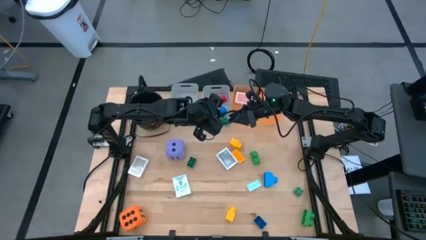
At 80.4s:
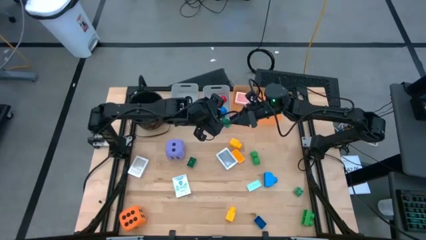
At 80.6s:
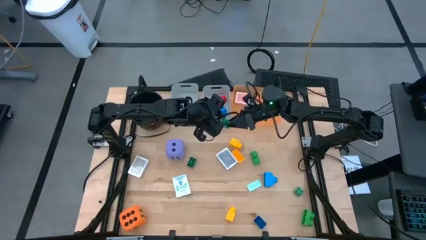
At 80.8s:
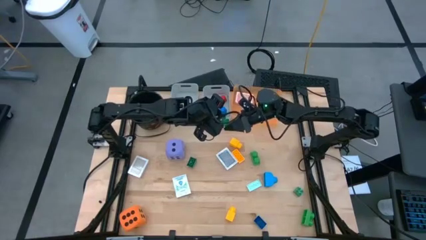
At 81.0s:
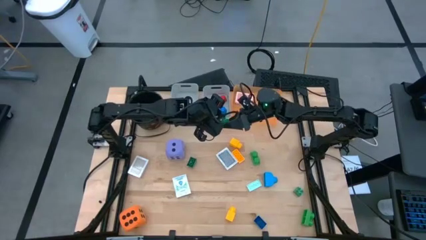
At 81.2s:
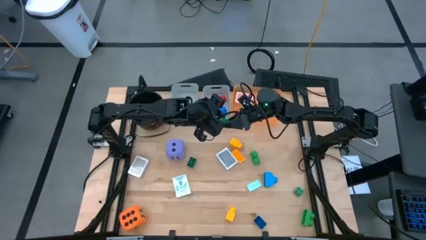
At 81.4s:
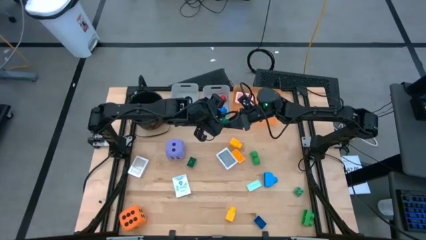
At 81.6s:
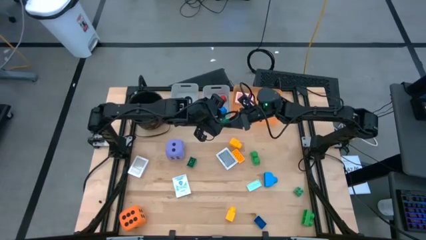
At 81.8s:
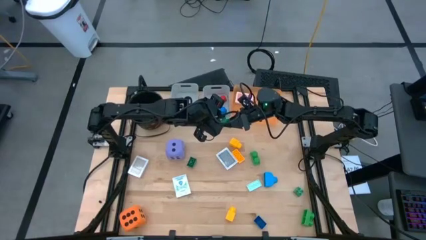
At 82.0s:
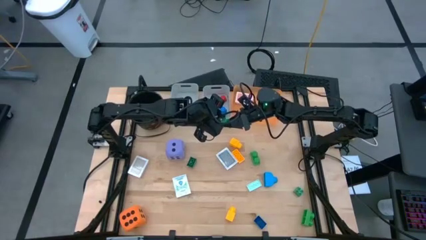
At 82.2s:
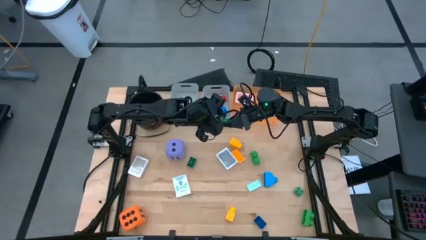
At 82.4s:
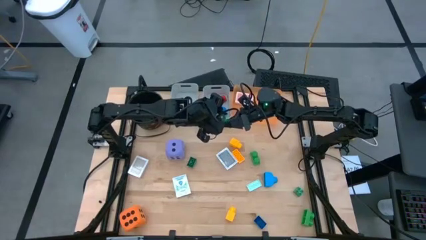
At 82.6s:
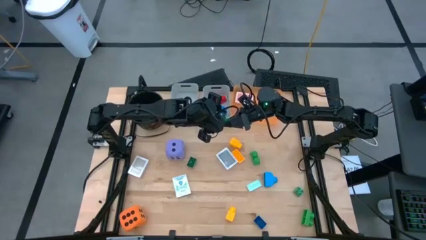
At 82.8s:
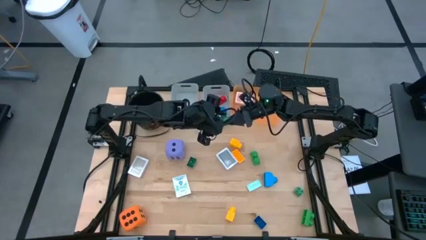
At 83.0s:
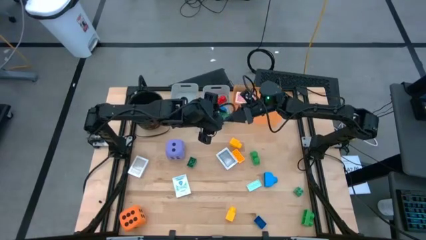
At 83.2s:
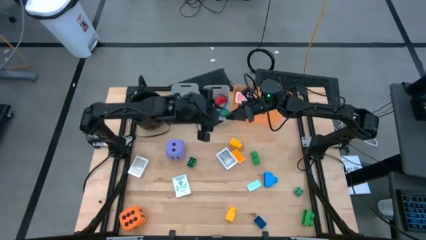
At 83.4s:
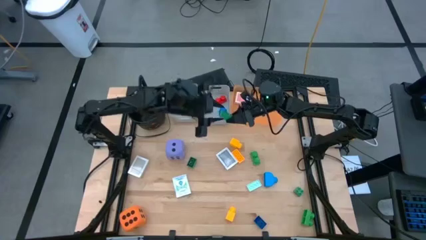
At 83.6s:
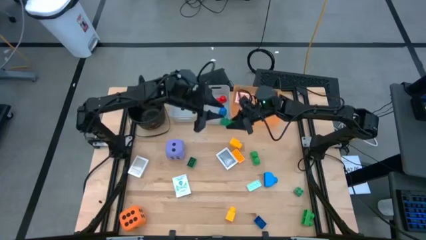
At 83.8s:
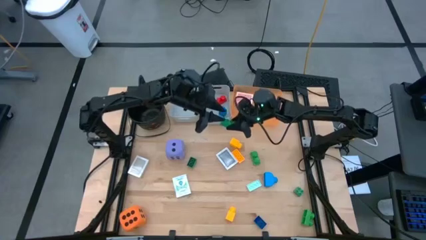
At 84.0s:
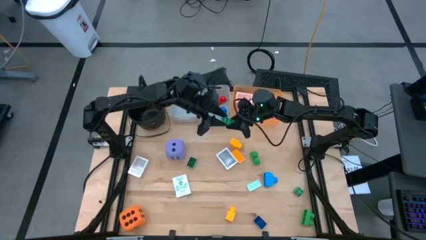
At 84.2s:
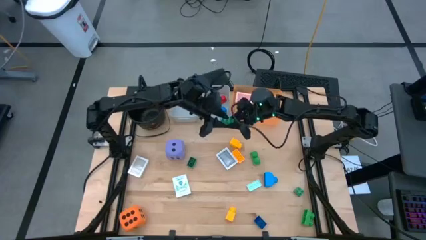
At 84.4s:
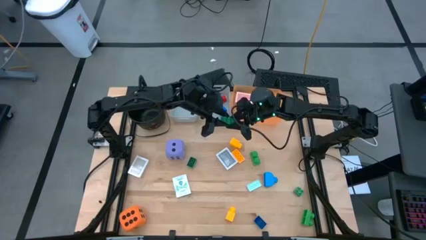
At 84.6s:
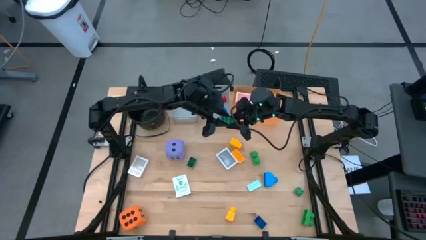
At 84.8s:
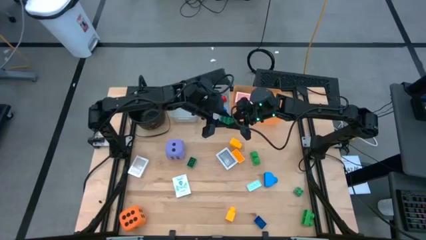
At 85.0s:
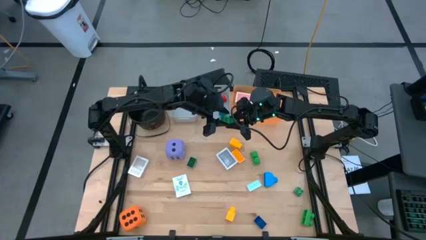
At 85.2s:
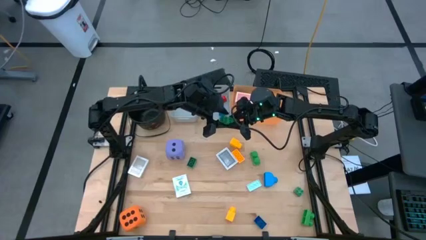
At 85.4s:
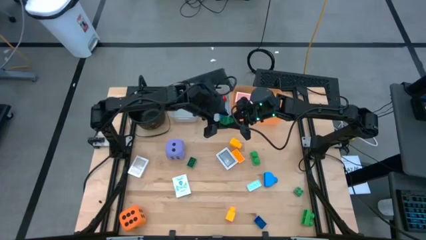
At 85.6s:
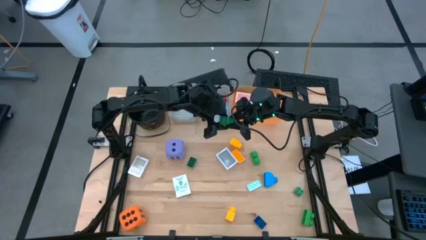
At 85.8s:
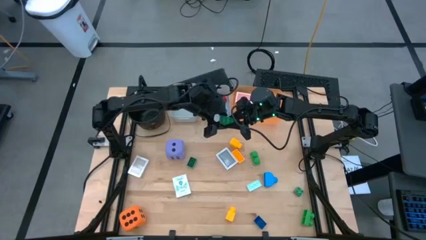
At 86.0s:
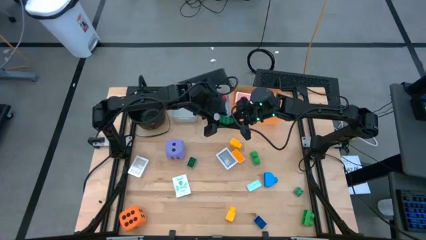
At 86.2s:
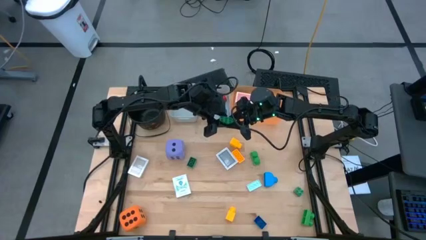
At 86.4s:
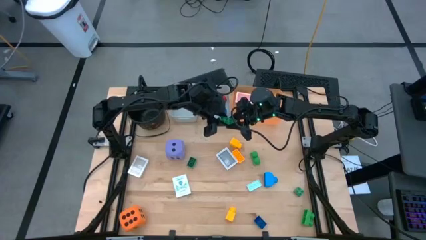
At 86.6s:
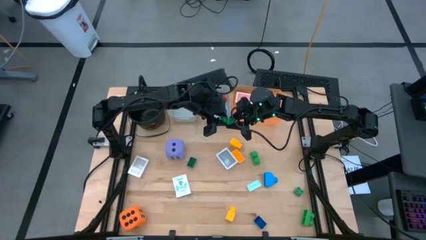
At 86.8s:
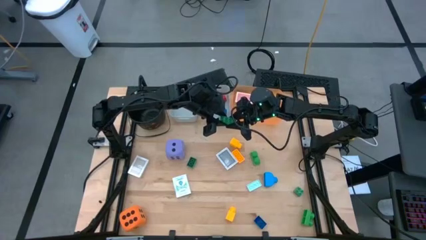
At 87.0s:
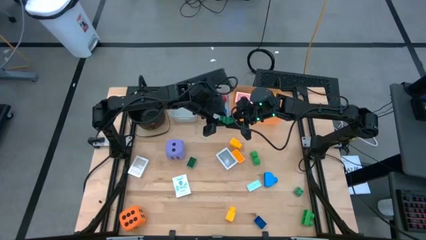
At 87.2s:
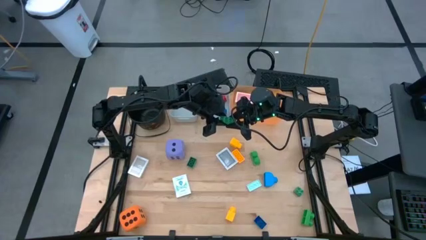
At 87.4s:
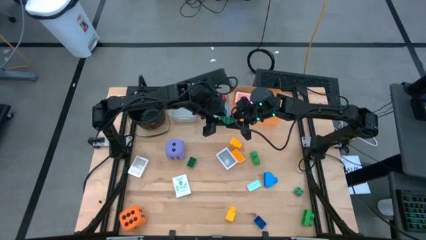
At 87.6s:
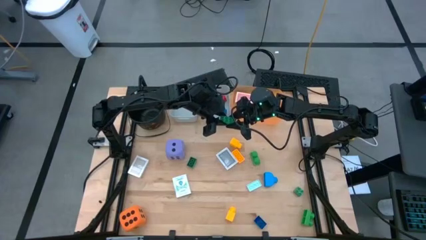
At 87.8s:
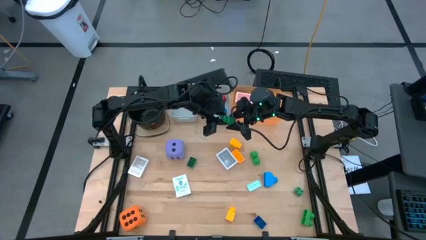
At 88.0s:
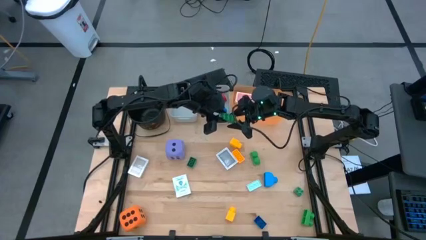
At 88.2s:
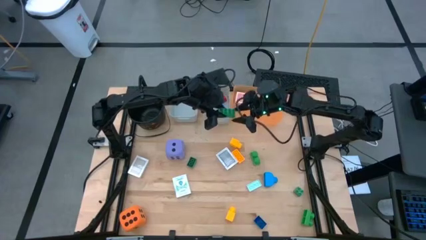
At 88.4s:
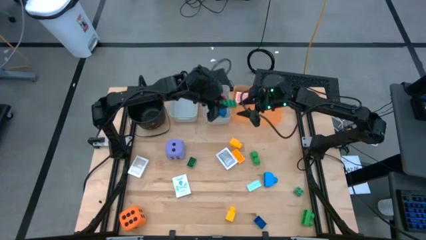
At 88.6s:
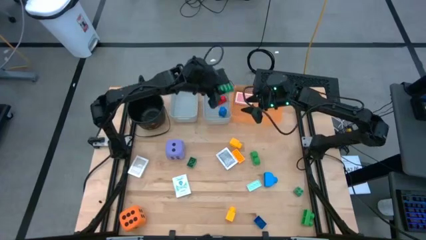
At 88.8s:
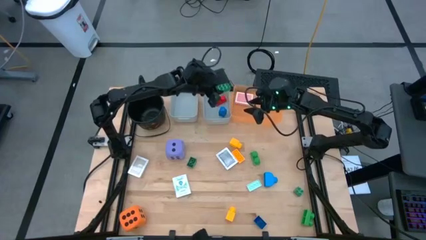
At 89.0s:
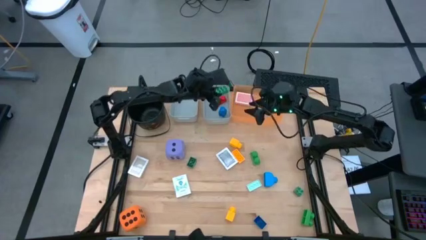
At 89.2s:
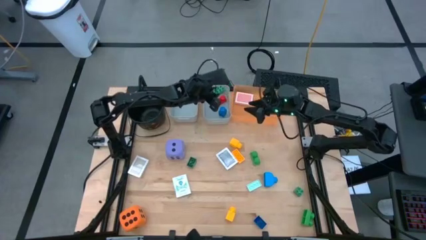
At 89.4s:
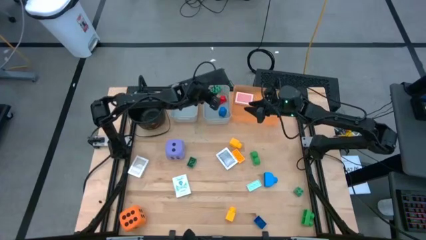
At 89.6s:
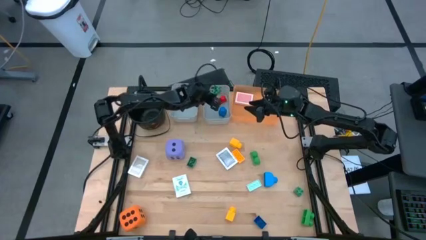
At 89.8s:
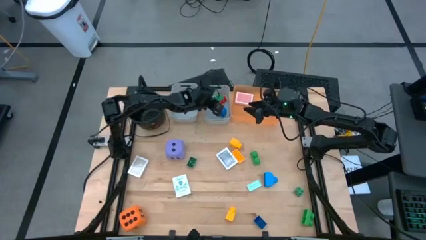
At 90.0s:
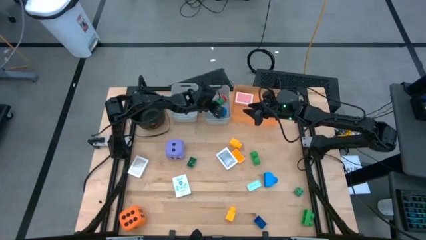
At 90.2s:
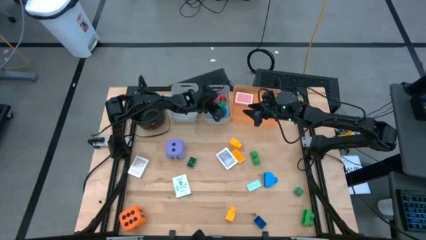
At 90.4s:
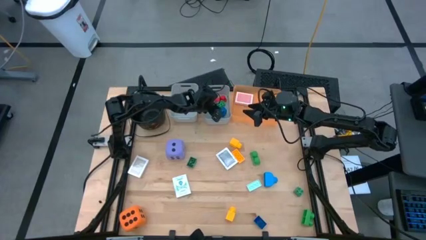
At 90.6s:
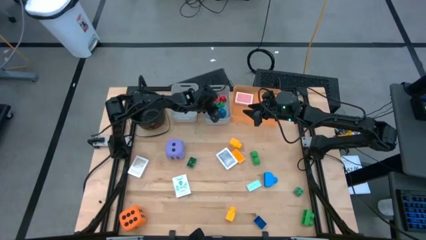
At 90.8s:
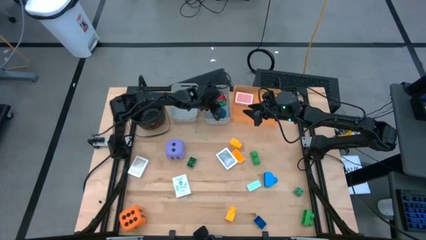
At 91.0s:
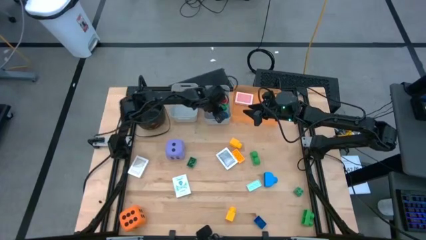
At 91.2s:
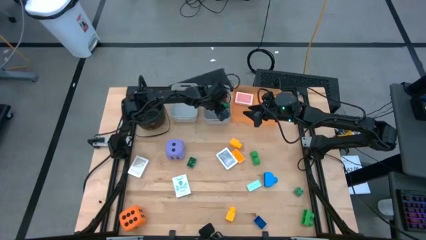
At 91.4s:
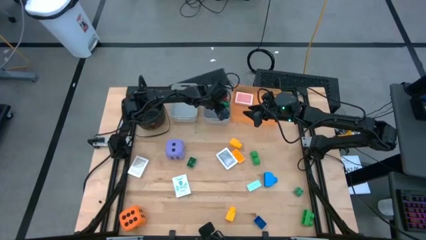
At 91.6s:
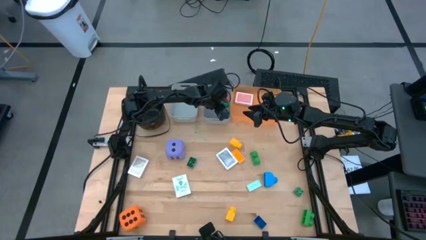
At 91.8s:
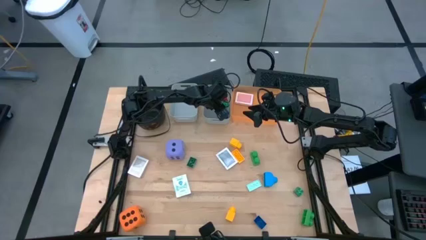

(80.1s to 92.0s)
Task: Pick & Place Toys
Put the green gamepiece into the right gray bin
